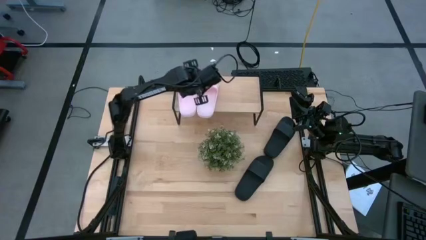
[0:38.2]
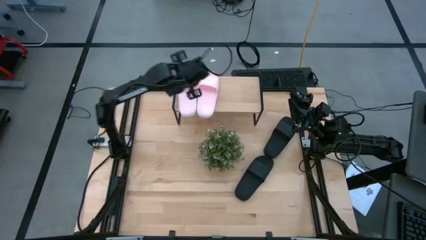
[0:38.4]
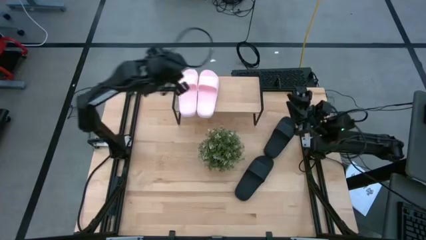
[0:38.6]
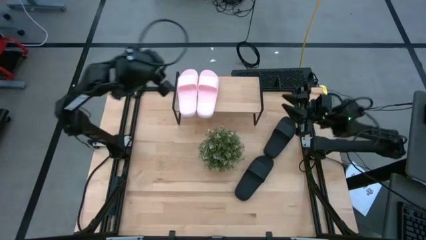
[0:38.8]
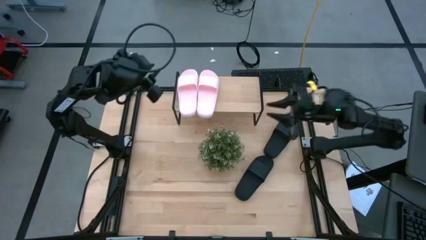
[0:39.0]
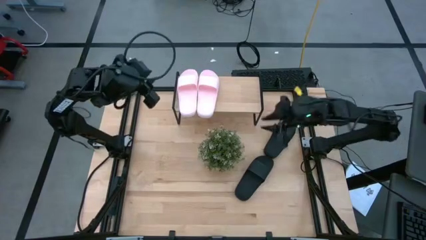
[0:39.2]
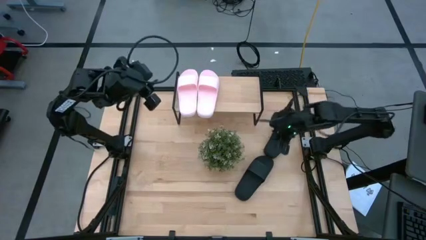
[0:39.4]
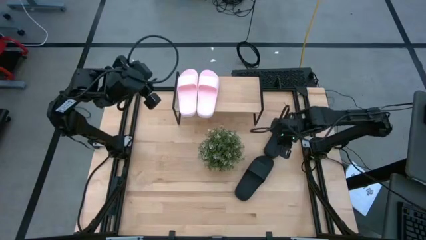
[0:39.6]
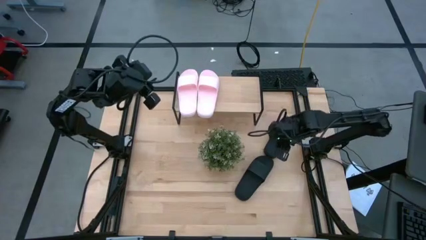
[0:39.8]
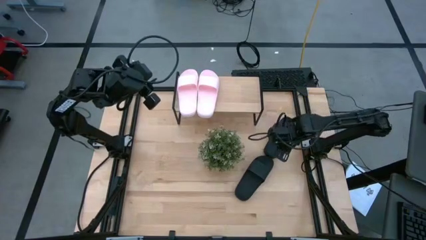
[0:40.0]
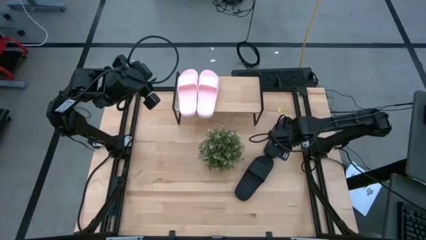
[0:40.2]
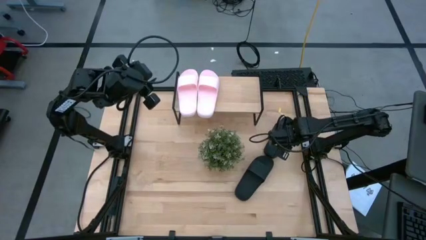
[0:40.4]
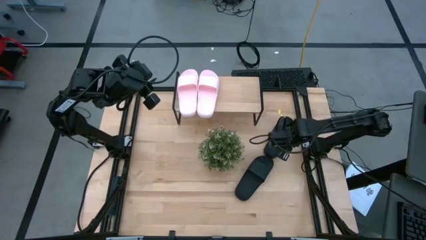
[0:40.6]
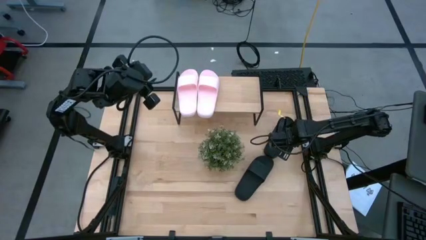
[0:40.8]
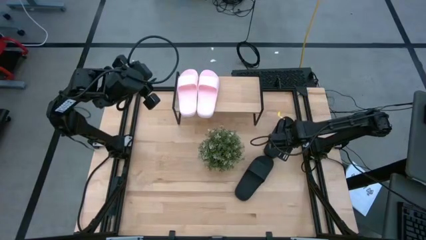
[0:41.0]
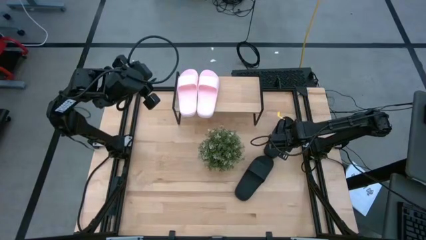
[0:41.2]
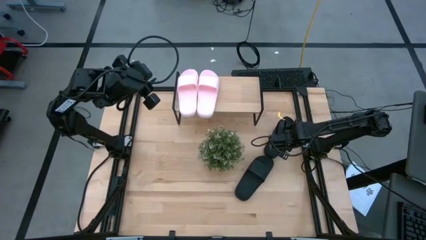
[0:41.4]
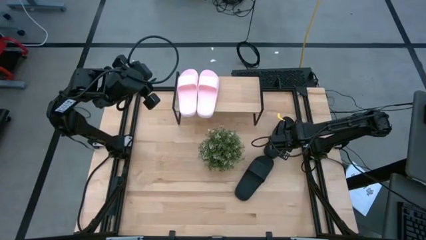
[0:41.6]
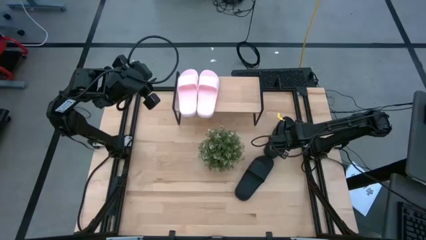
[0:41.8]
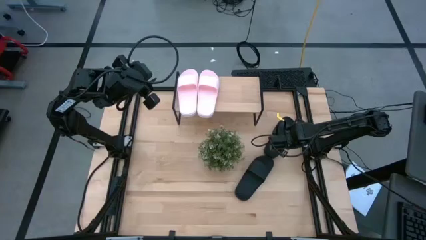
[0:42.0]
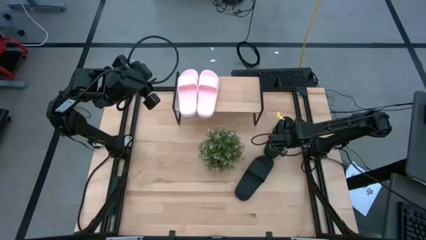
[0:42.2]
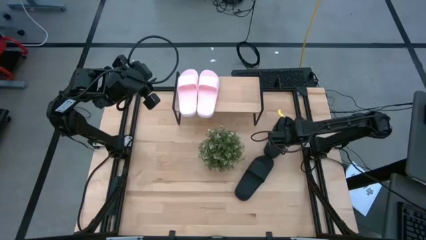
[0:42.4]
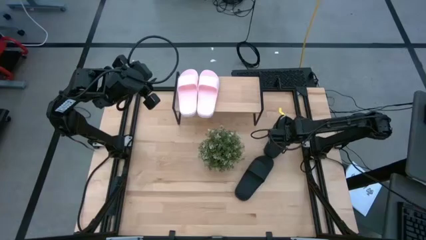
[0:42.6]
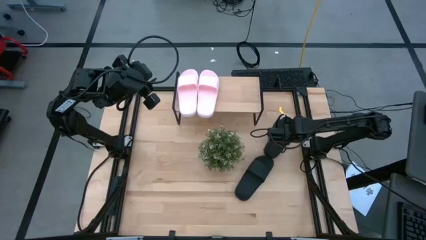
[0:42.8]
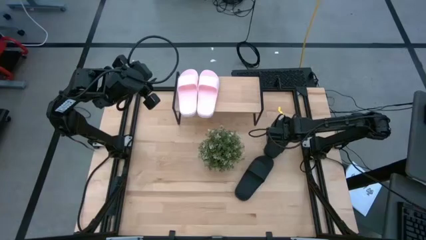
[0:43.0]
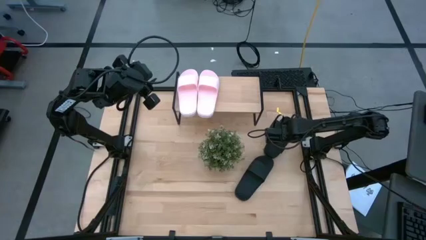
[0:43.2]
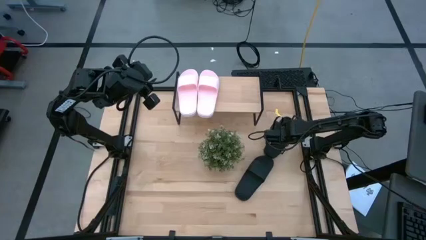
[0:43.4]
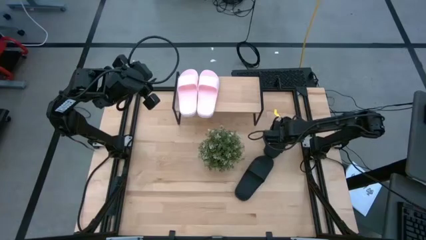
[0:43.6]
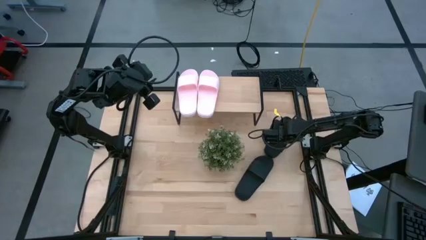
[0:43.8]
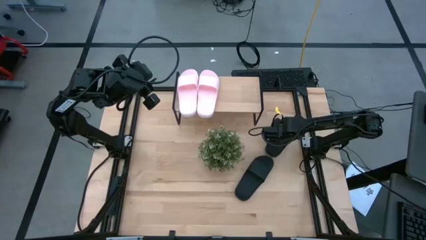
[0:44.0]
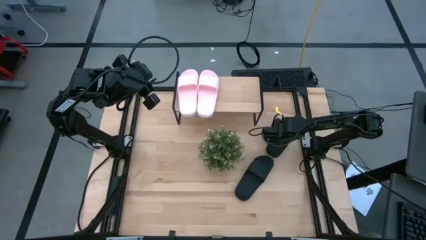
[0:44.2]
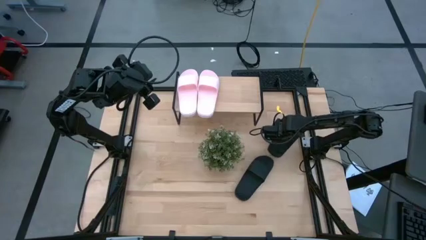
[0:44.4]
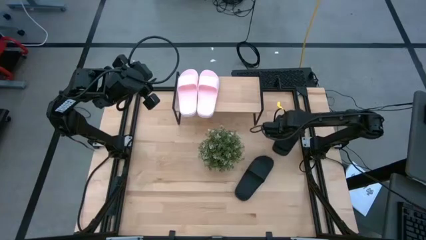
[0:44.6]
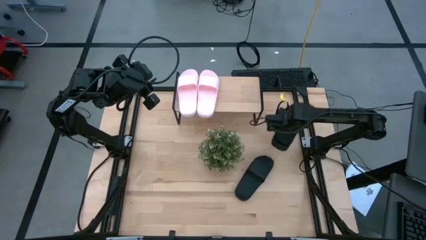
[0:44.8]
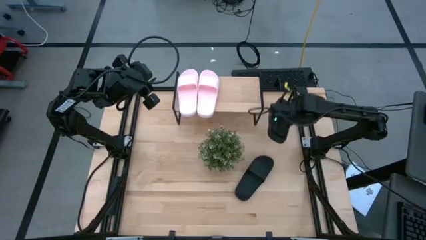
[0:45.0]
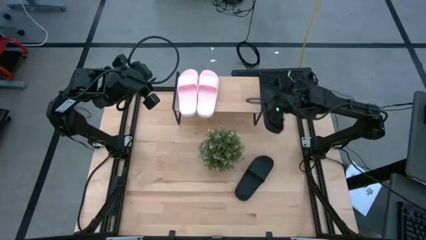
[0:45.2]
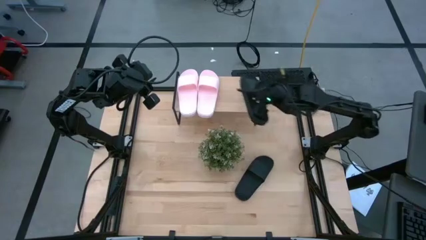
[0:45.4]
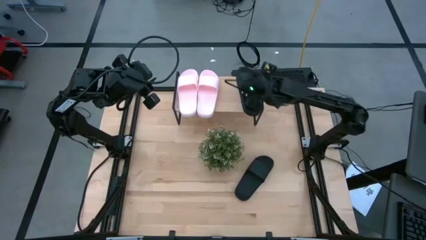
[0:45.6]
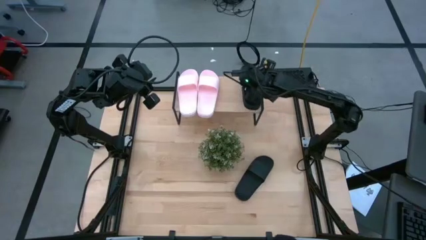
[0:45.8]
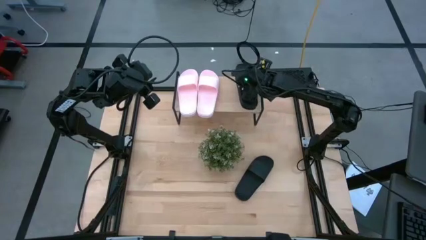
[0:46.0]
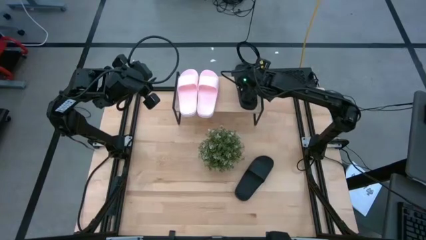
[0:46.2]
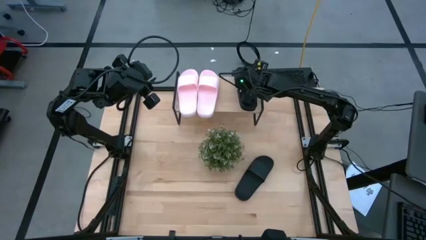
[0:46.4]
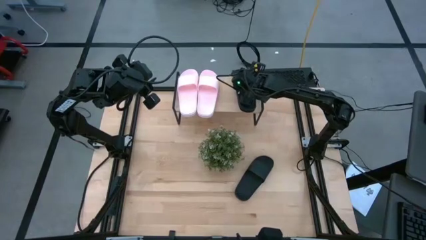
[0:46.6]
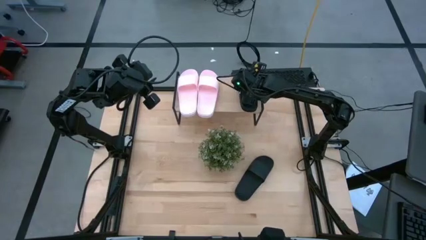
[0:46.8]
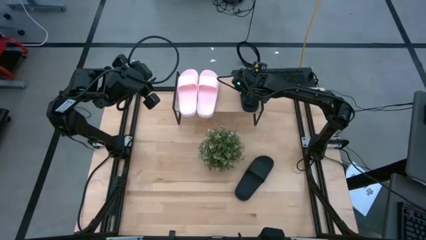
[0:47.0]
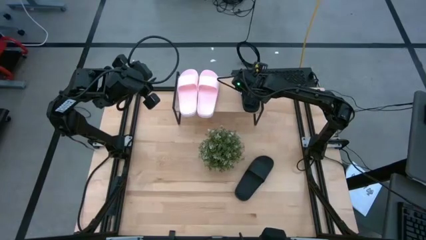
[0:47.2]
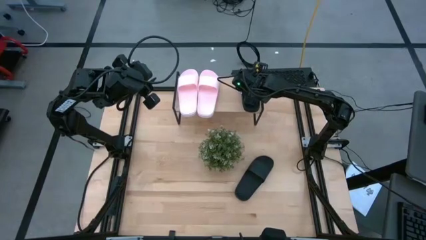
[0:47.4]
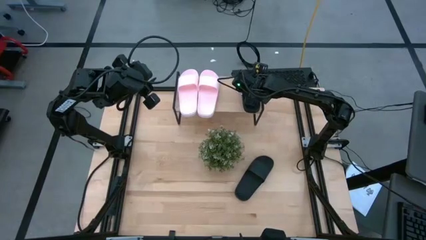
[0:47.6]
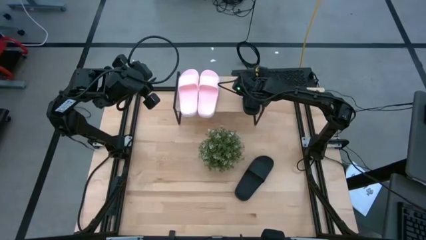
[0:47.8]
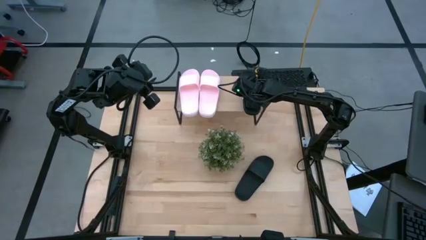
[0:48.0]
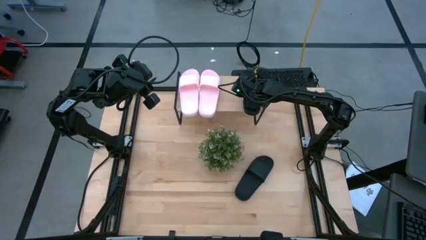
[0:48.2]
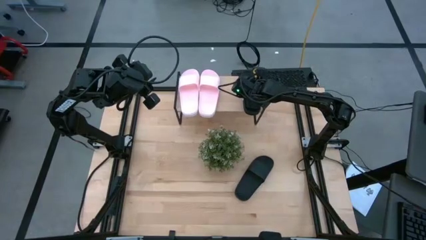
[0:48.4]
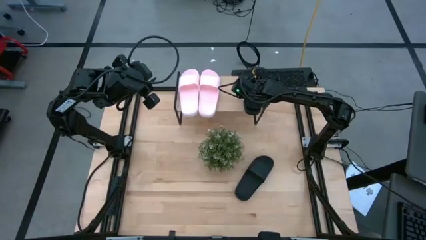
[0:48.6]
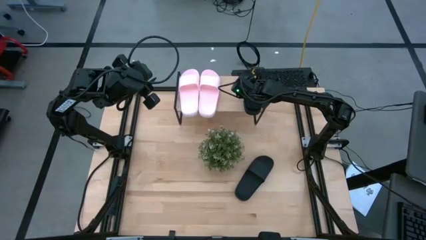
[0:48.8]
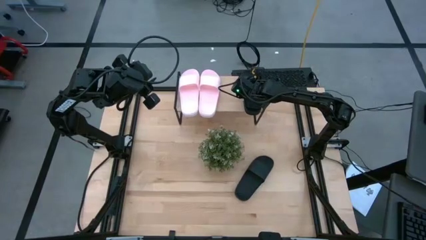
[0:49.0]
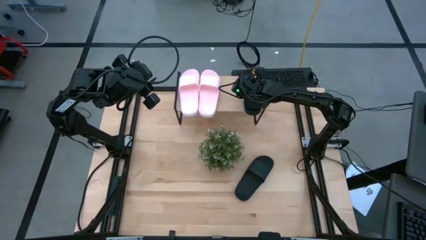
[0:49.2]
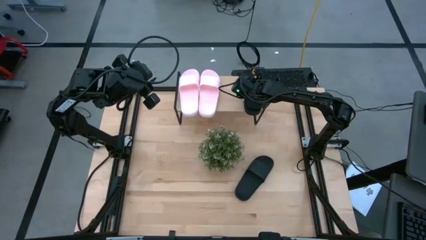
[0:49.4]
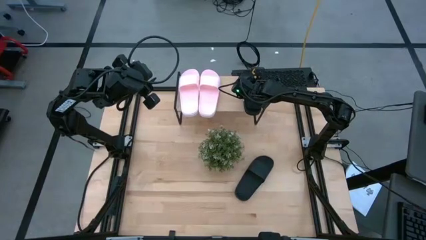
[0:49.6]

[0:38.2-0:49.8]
Task: Pick and place slides into the shelf
Put the top black slide on the shelf

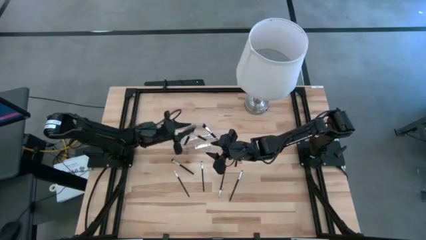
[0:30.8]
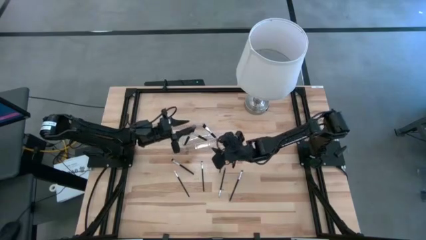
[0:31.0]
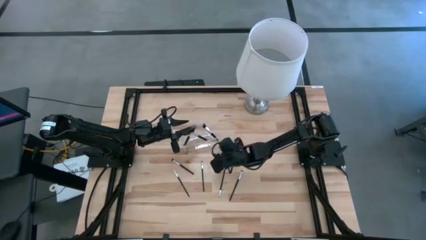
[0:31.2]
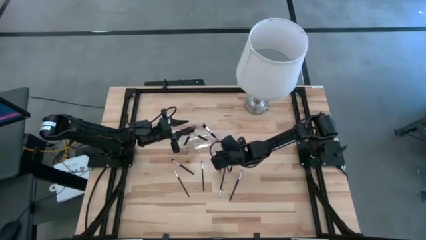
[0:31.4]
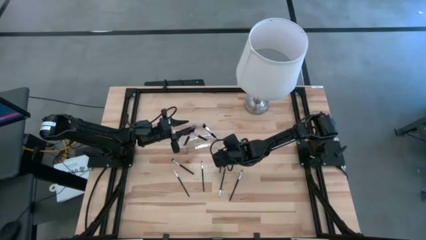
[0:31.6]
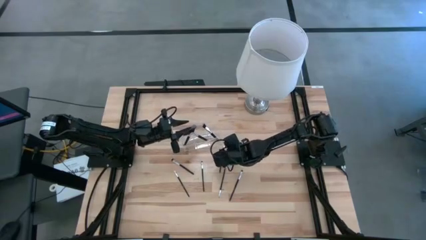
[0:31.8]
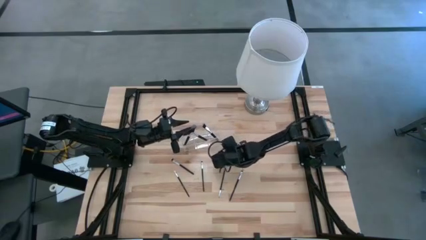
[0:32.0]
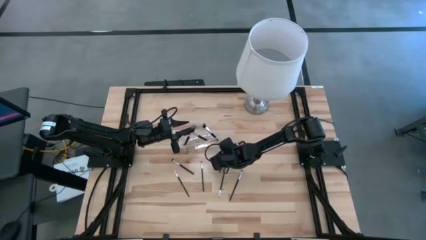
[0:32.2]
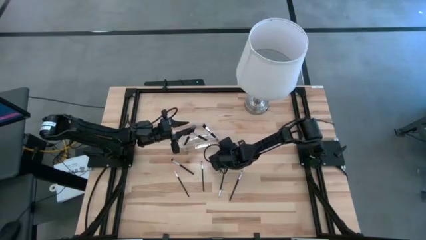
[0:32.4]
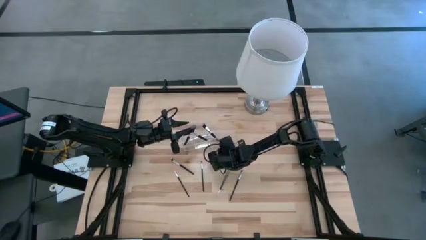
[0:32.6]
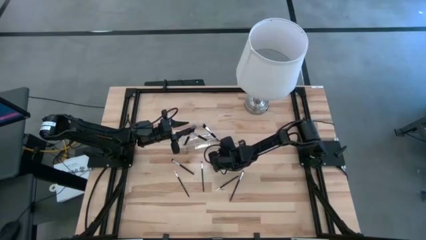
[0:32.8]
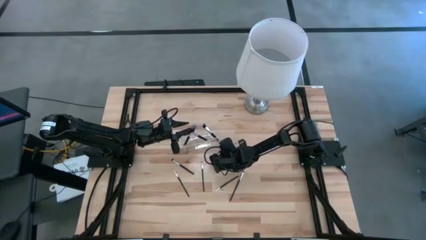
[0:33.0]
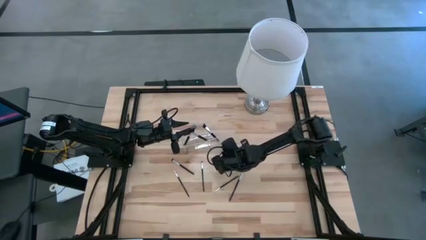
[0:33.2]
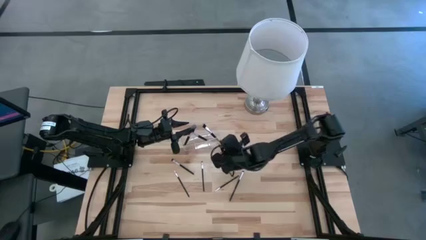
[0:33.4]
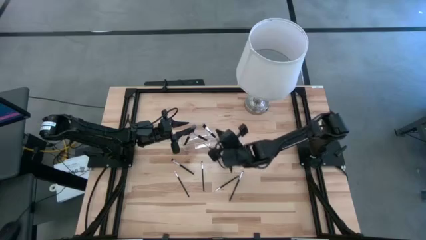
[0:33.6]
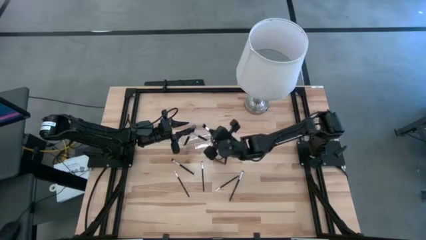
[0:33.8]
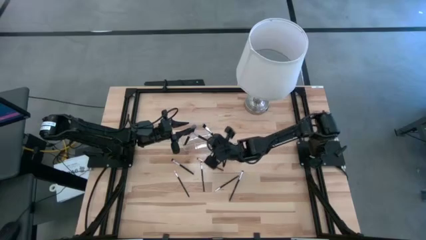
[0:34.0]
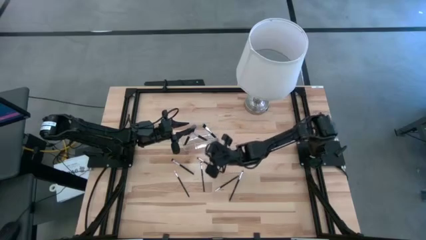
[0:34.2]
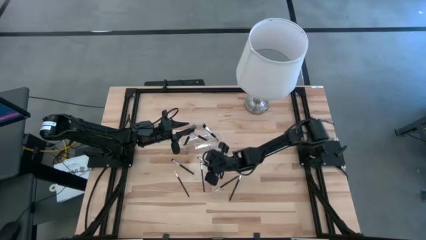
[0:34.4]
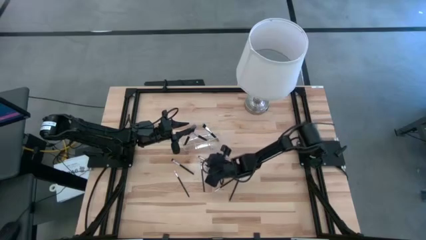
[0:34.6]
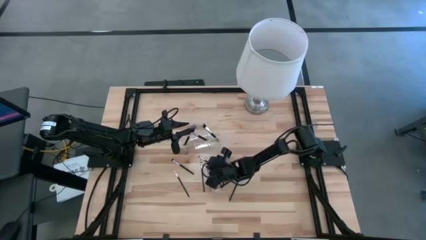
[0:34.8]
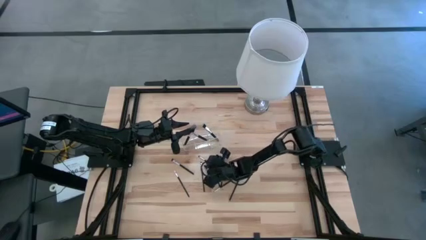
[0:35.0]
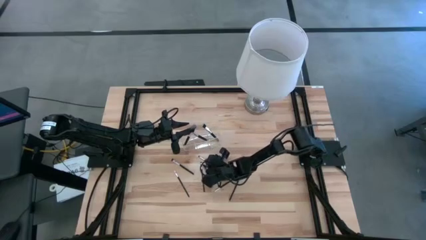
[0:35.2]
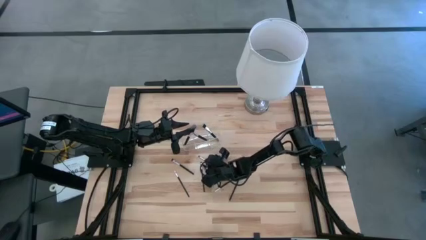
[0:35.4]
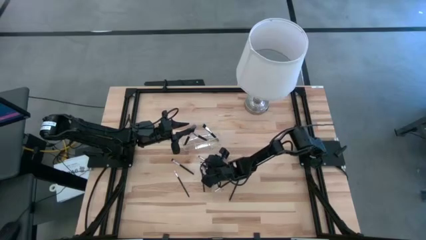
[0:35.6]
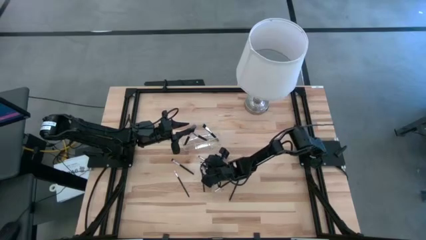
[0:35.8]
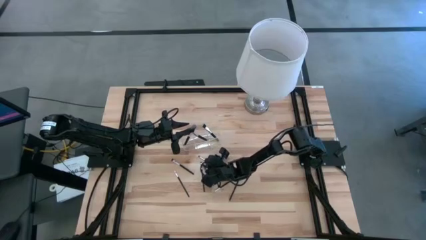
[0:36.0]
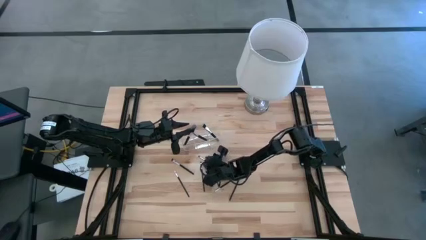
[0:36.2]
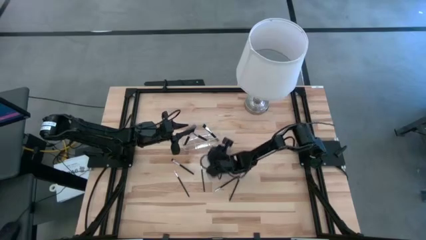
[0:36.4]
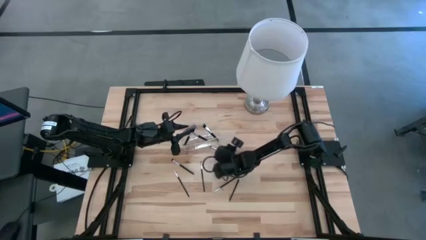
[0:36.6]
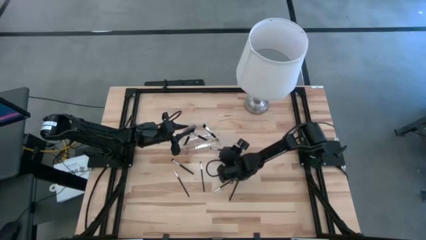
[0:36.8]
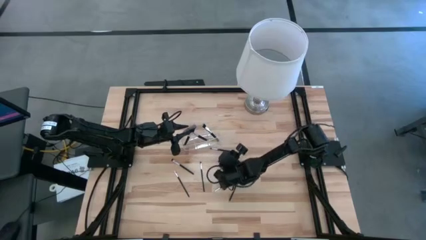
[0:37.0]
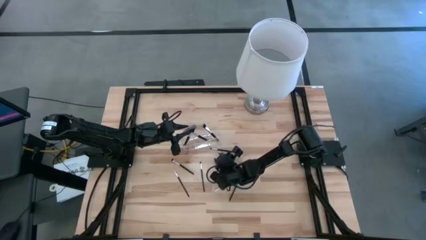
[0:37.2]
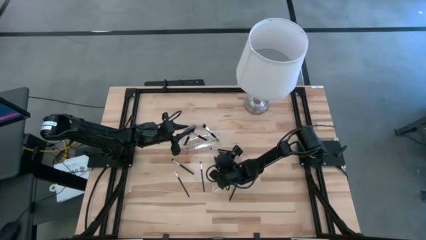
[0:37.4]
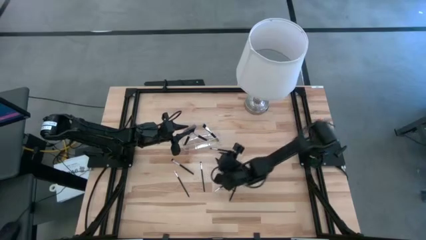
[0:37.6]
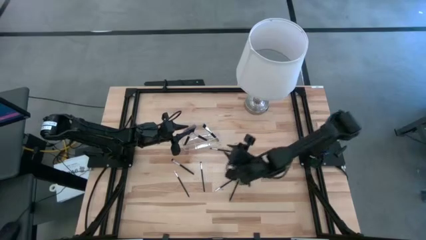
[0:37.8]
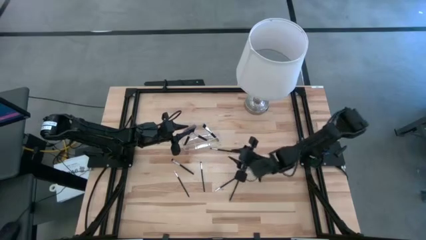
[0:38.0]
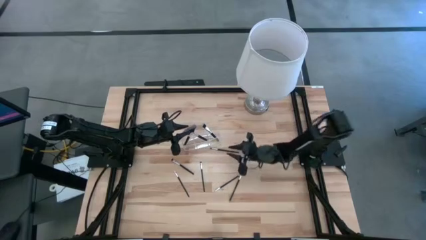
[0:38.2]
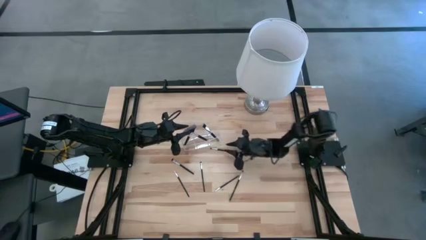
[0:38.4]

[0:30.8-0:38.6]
Task: Put items in baskets/containers
Put the eyeshadow brush into the right transparent organizer
